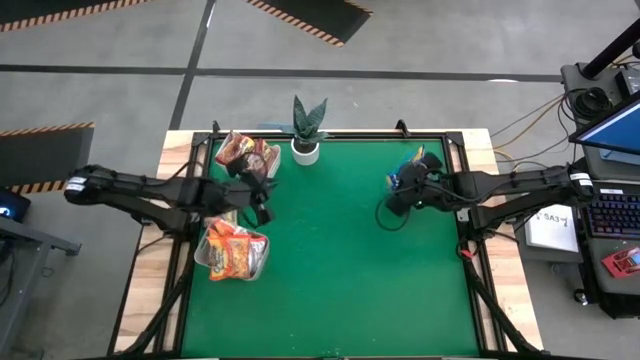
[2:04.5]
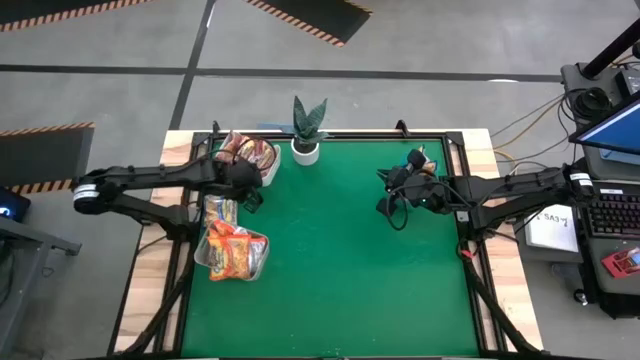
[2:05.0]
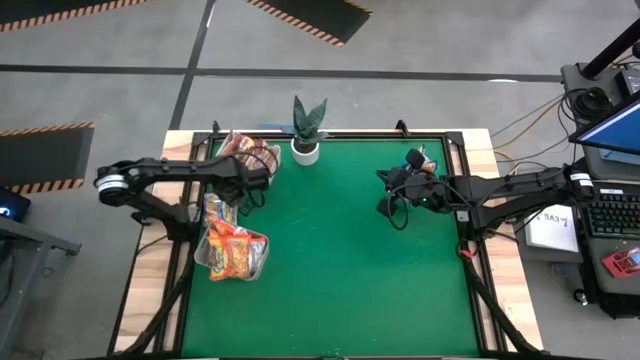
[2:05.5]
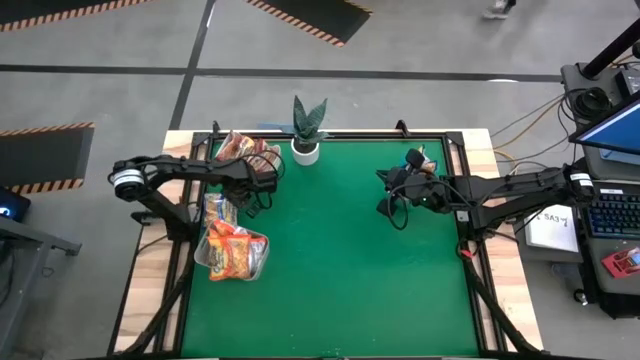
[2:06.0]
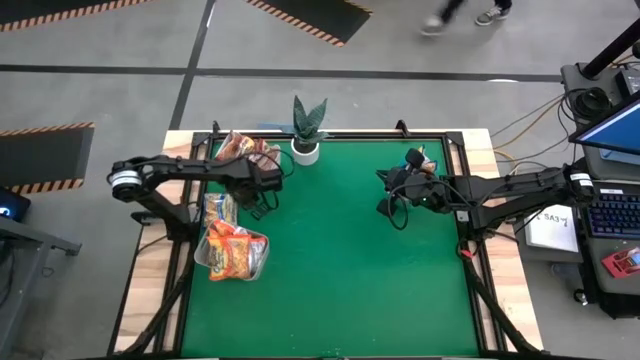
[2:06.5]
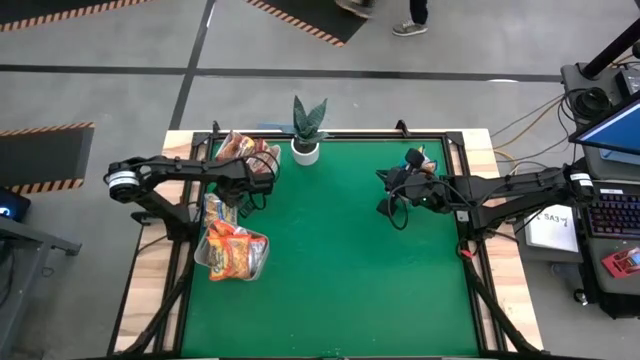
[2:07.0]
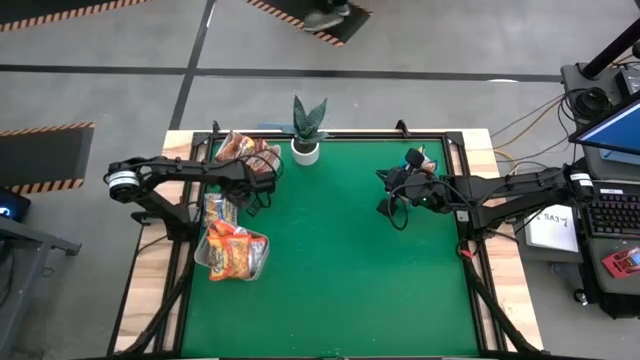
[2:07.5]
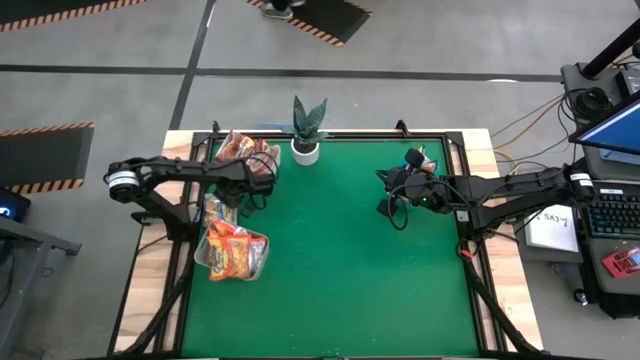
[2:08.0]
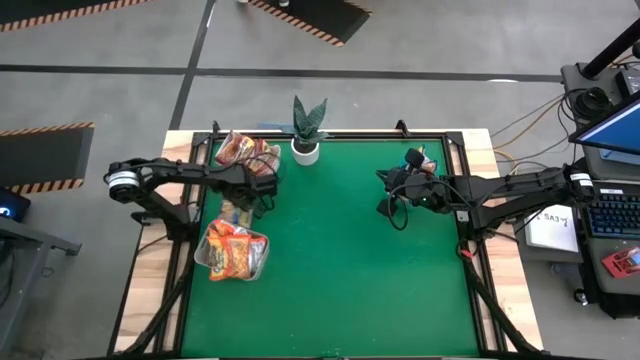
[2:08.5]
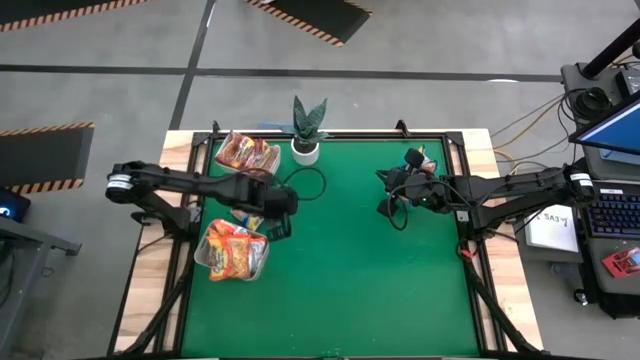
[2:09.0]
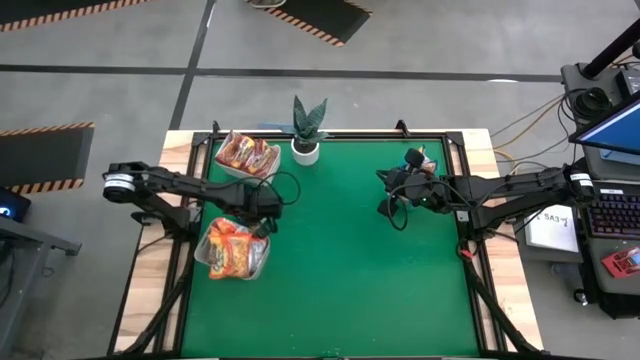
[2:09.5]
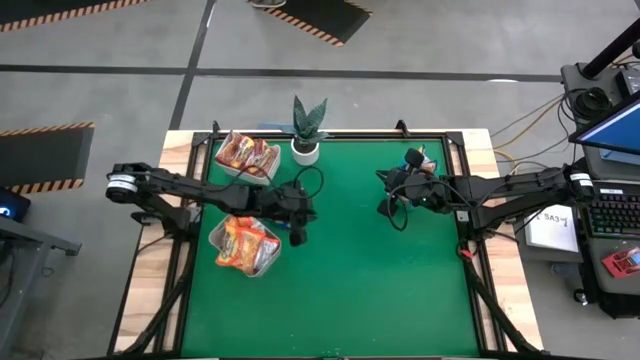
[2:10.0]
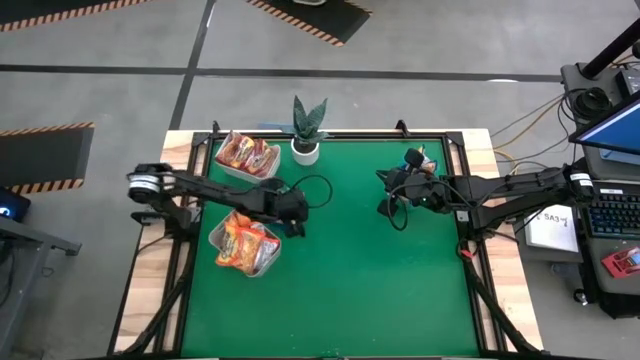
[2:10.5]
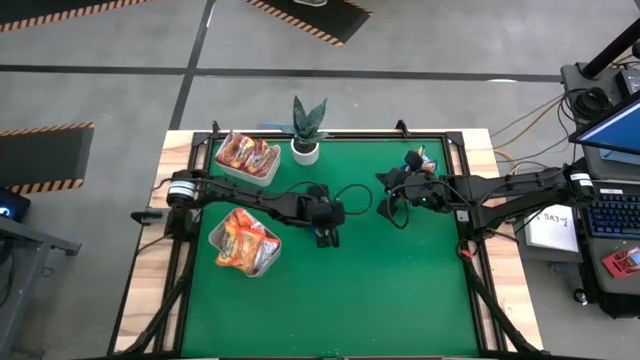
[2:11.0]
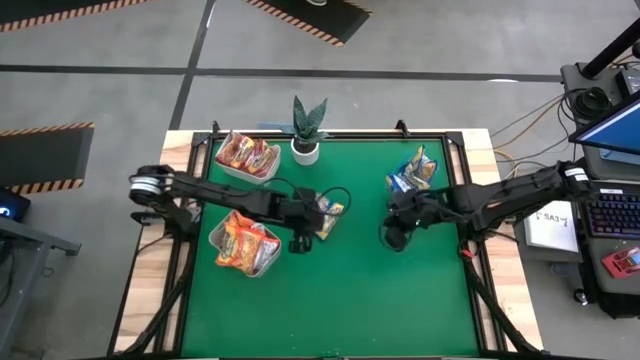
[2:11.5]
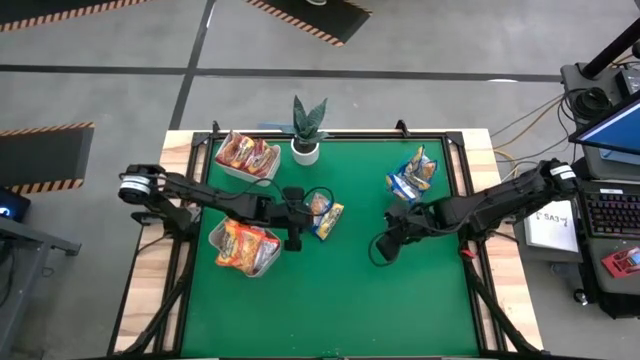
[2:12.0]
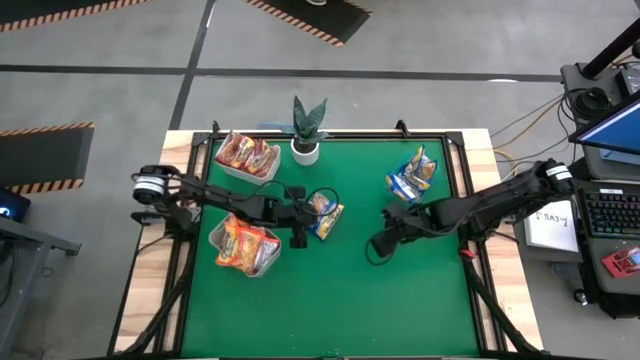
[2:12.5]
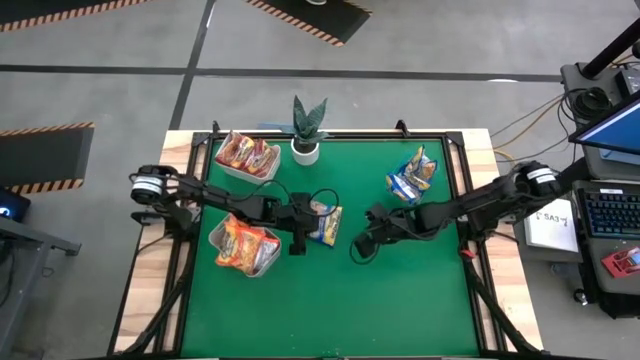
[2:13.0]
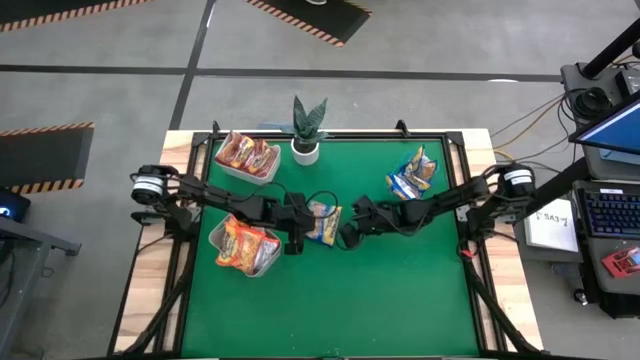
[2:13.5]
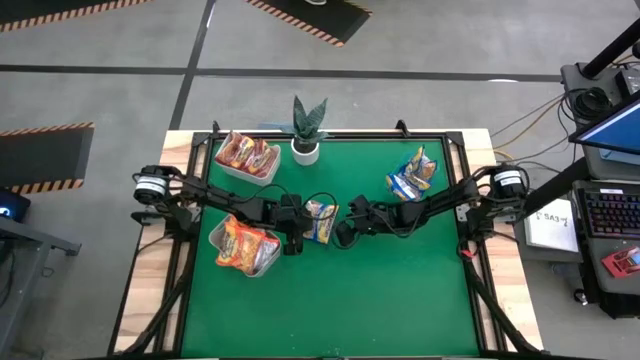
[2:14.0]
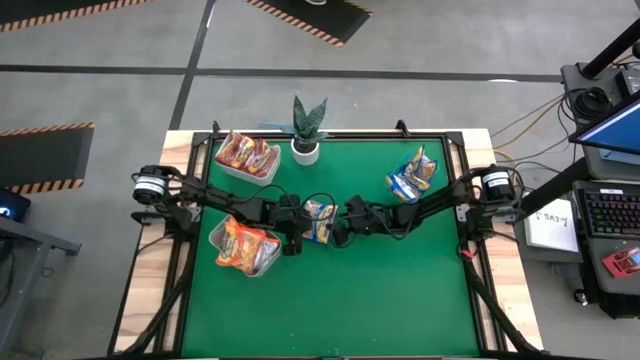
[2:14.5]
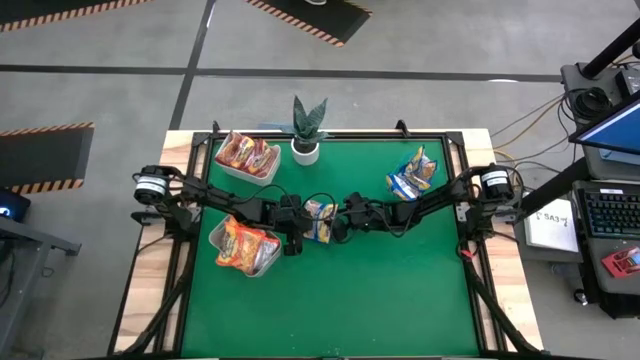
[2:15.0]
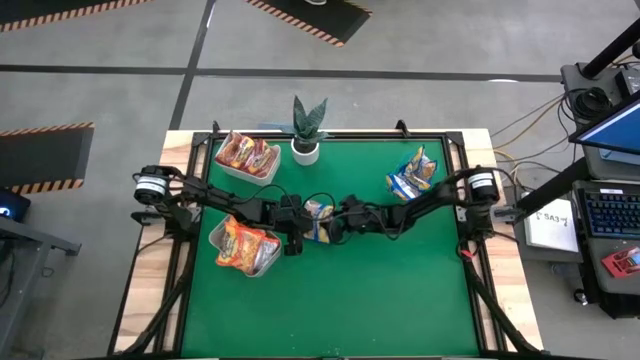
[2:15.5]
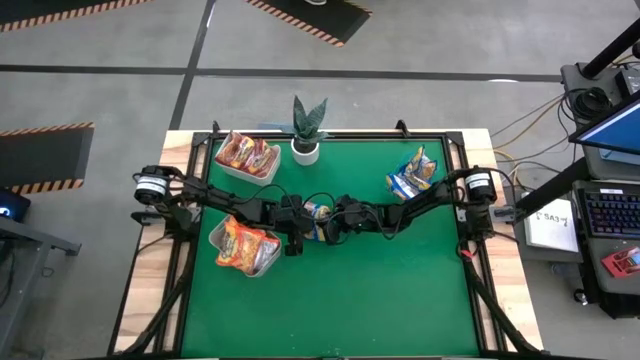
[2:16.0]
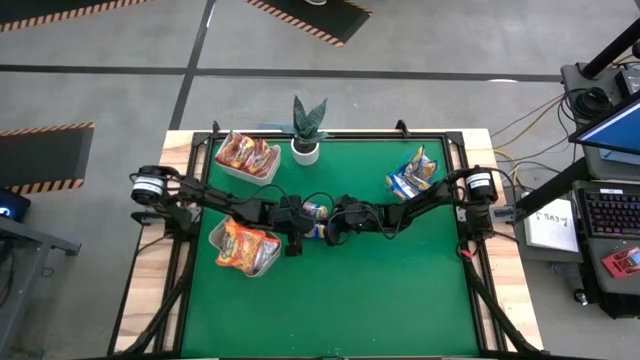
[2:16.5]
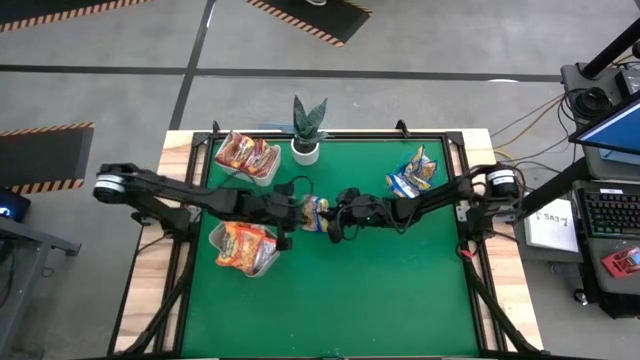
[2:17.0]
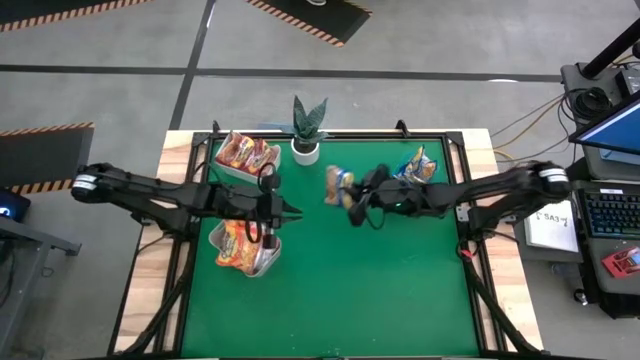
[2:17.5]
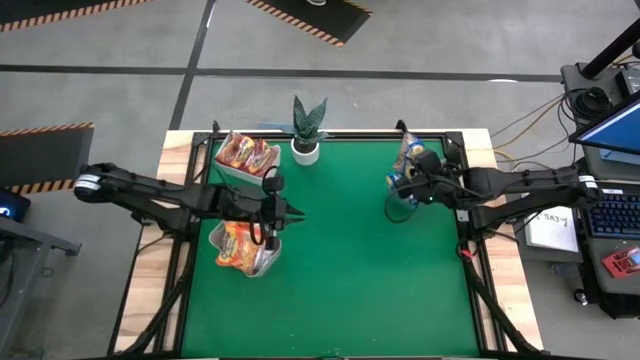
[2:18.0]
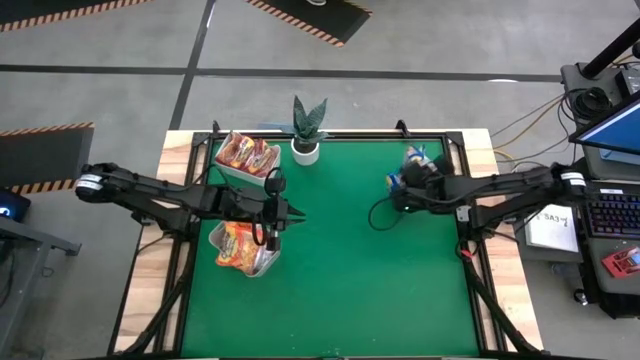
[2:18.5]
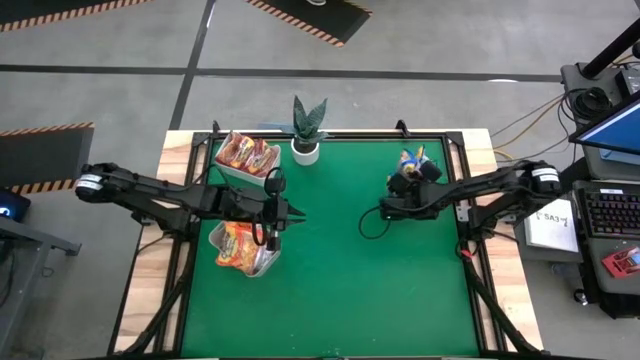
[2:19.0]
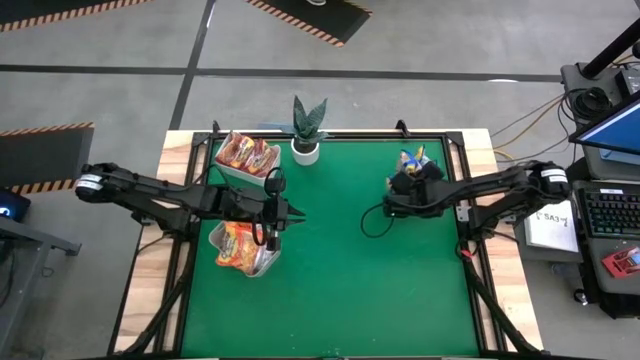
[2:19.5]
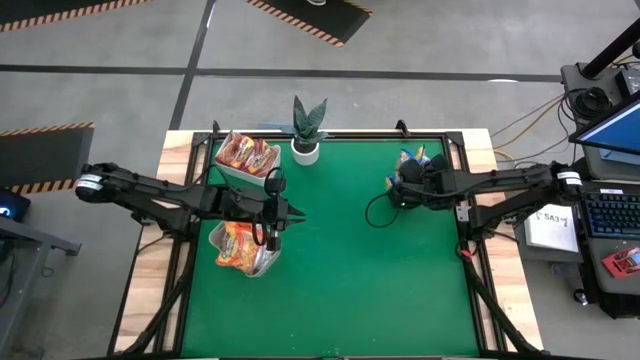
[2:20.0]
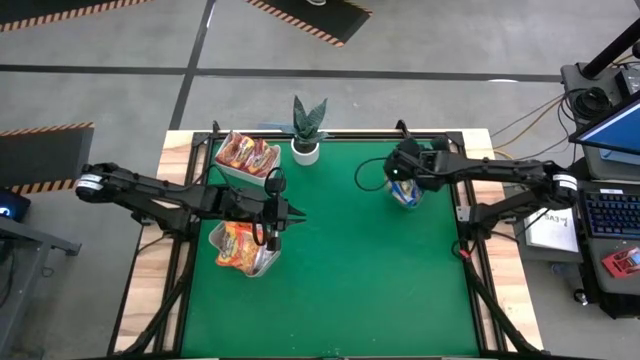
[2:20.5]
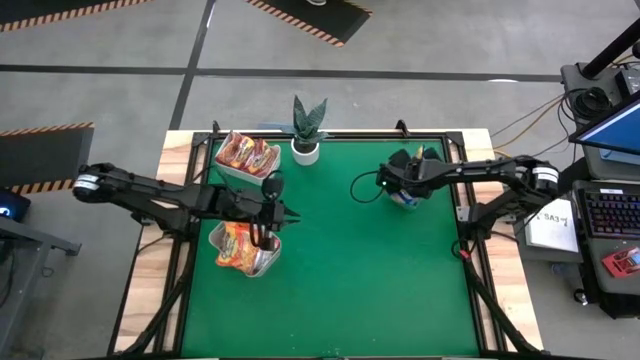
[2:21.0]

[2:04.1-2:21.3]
Task: Sort Maruchan noodles
Put the blue noodle pack into the blue bin

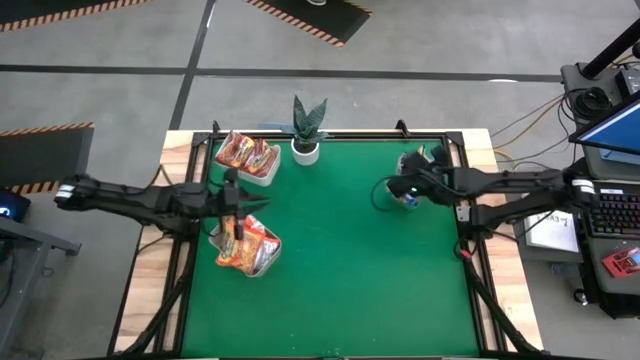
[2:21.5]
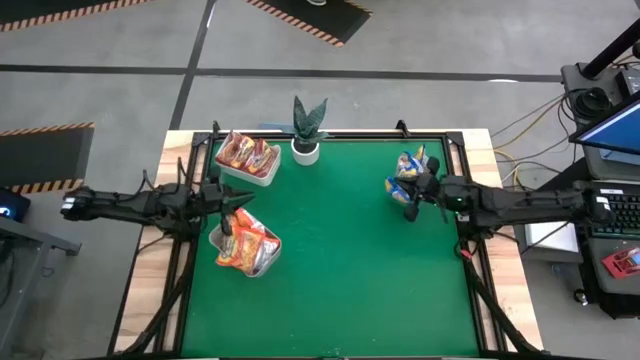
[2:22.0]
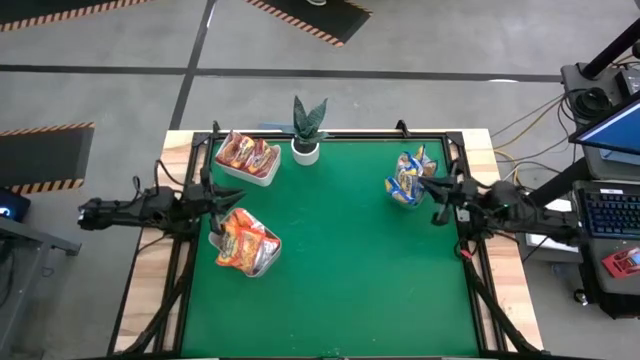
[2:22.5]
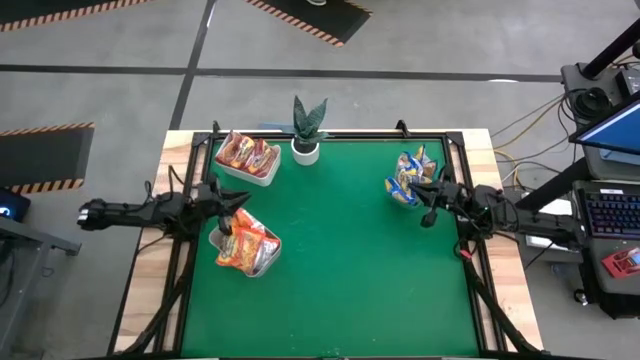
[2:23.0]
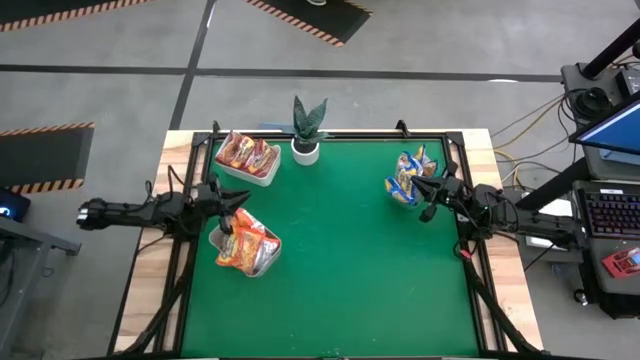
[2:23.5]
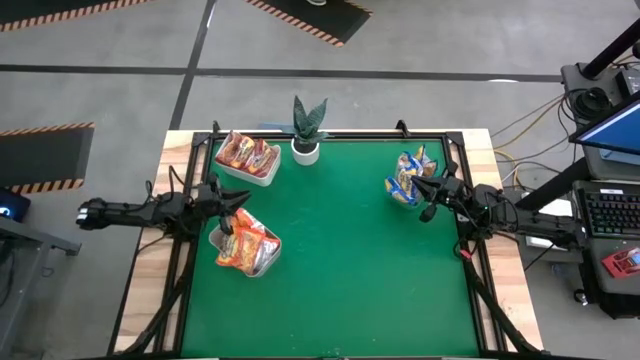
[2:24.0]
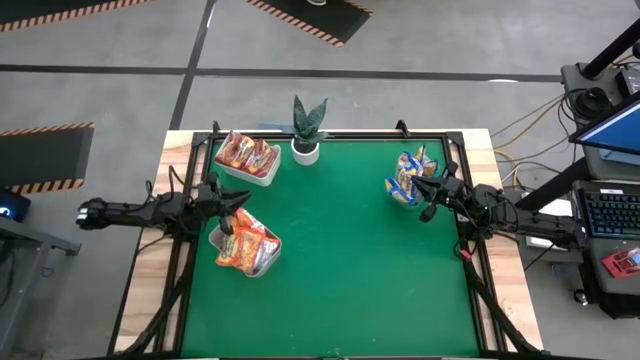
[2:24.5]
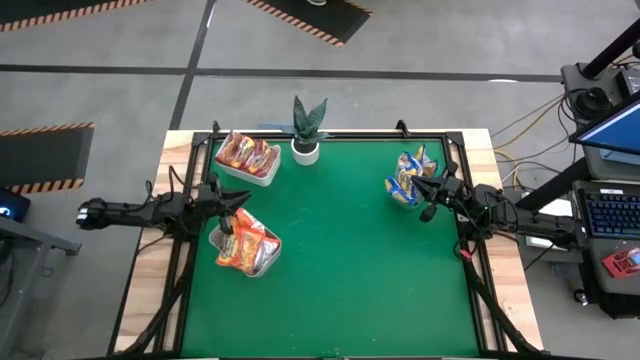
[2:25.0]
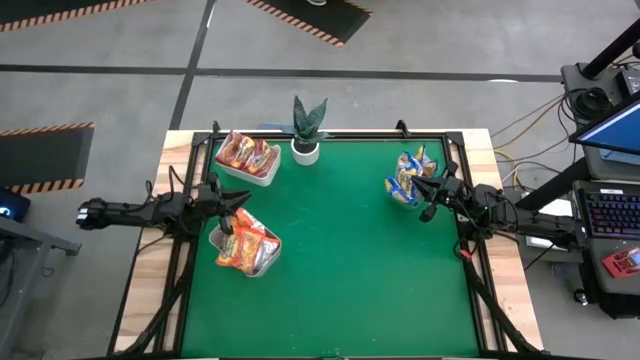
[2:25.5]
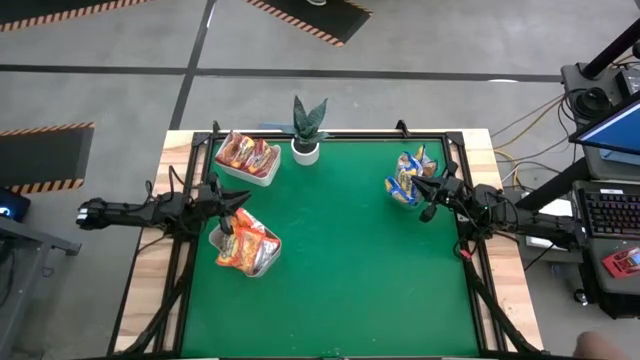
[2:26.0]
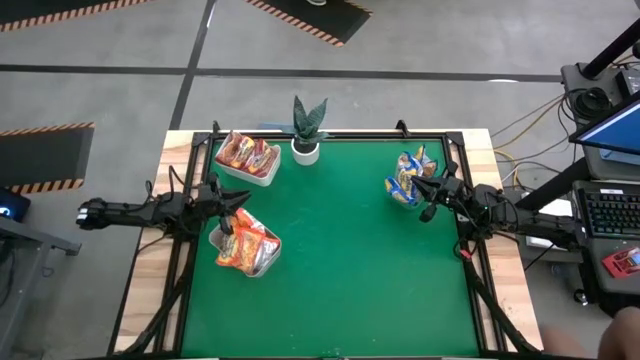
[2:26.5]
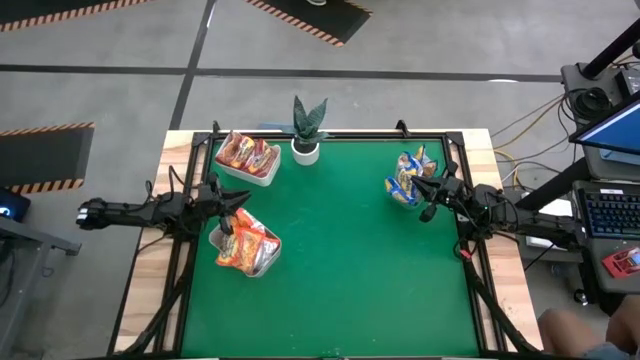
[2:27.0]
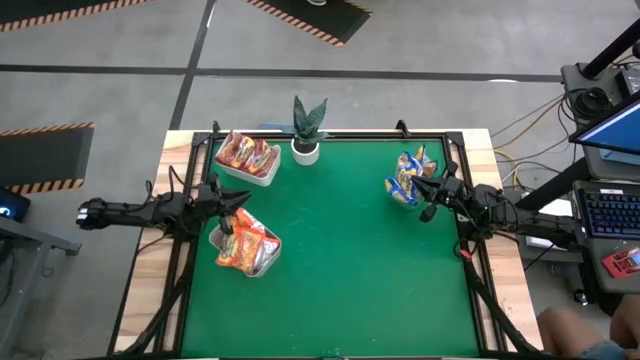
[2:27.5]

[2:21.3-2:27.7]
Return to Home Position
